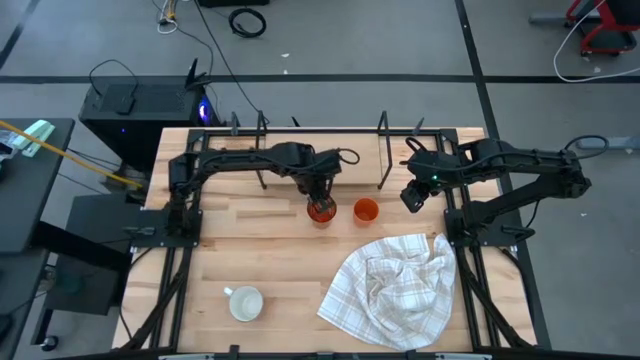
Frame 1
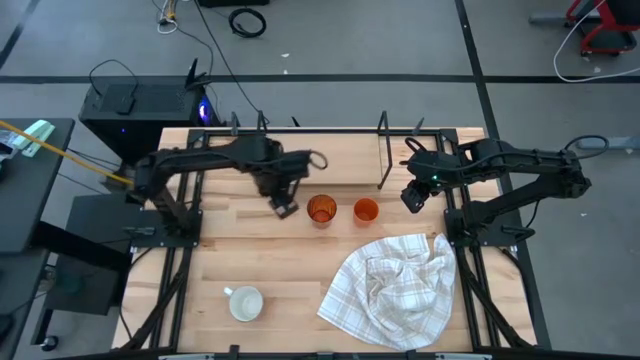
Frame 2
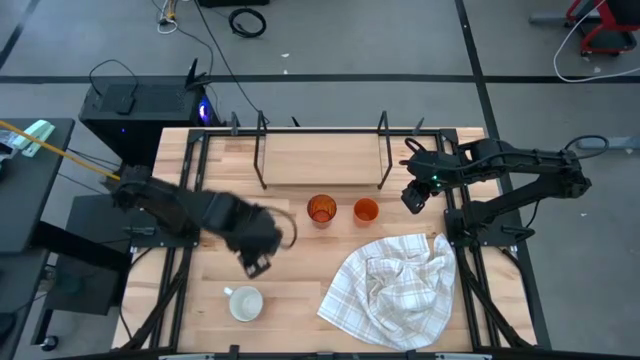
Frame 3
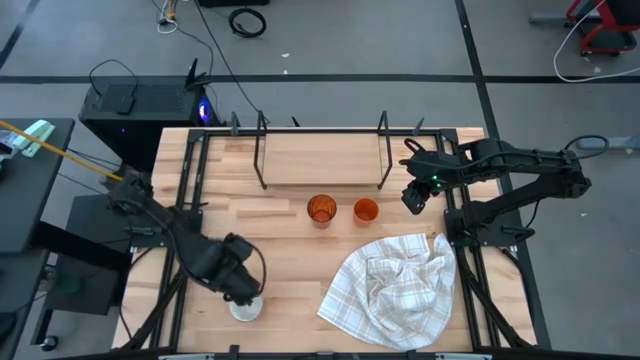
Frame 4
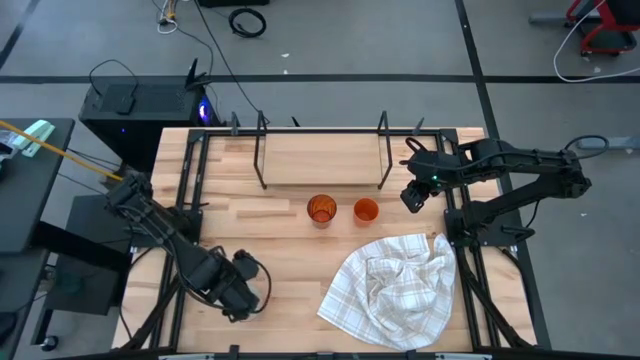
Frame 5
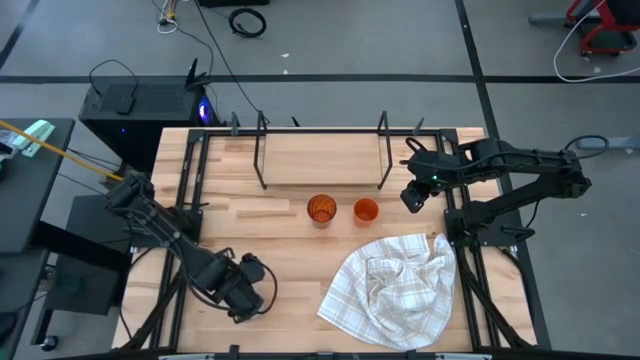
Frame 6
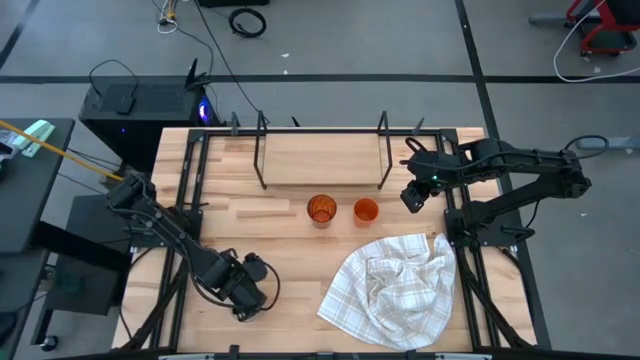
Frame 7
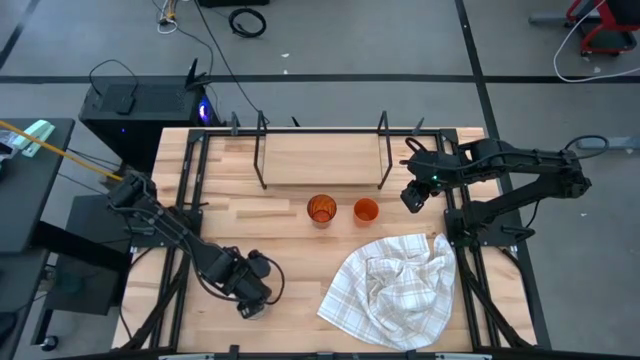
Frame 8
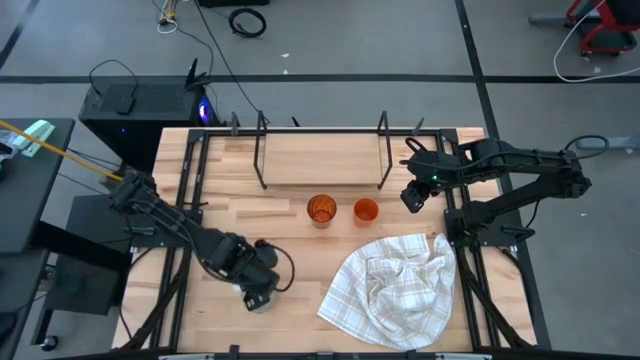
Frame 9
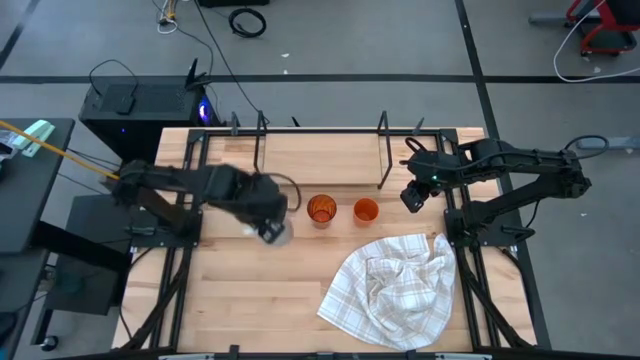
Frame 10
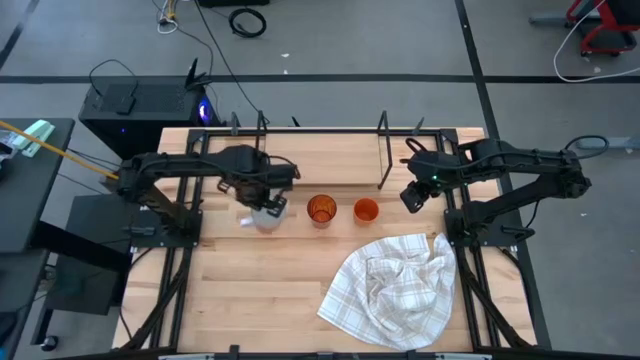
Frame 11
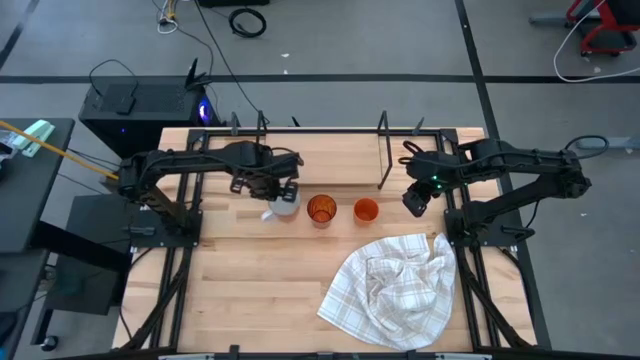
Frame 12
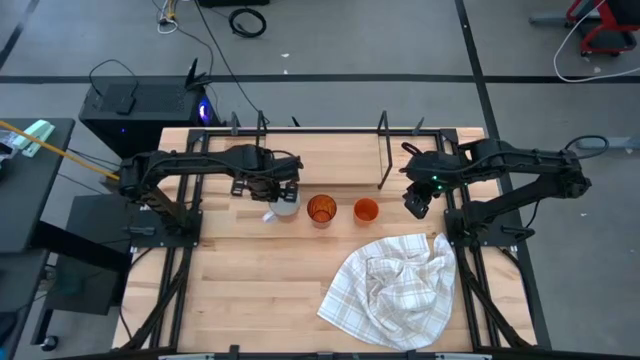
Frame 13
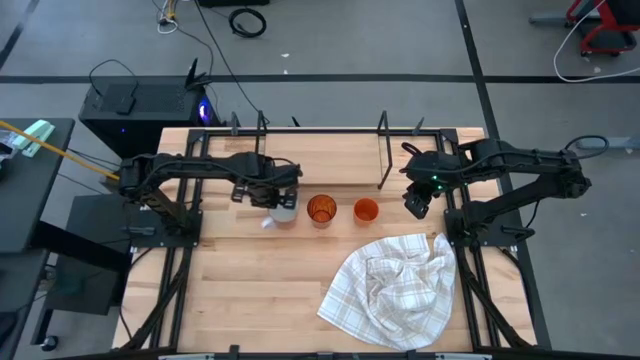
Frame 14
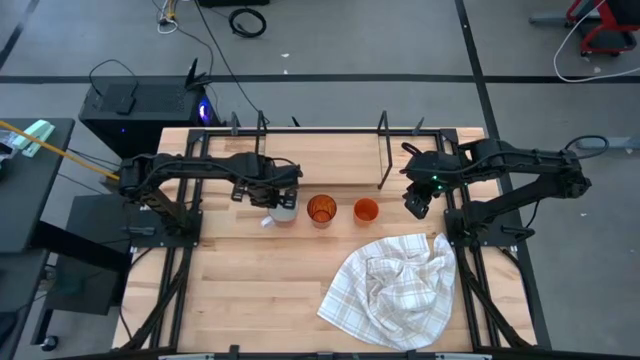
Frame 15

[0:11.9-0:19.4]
Task: Stack small to large cups/mugs on shelf
Move the orange mug to the left of the orange cup

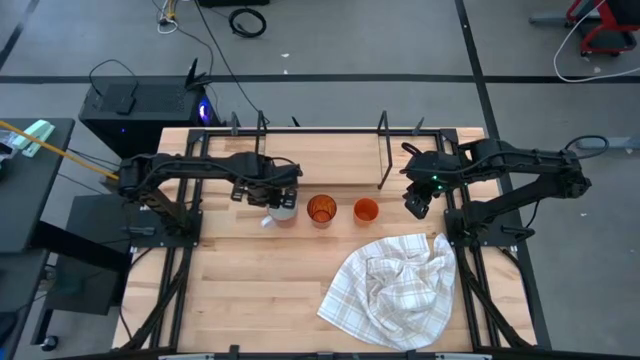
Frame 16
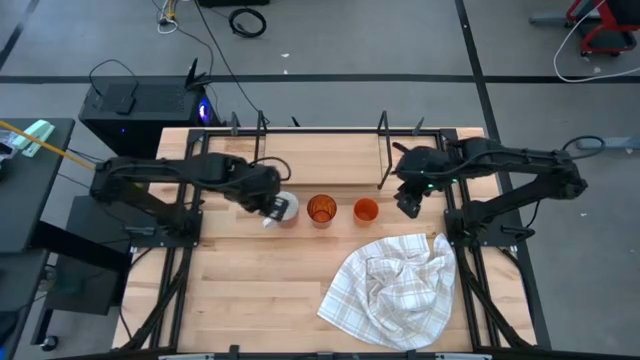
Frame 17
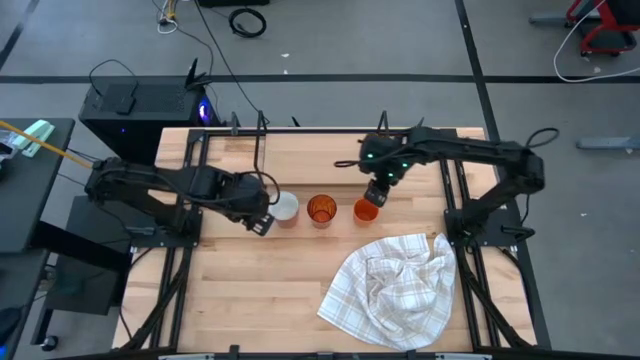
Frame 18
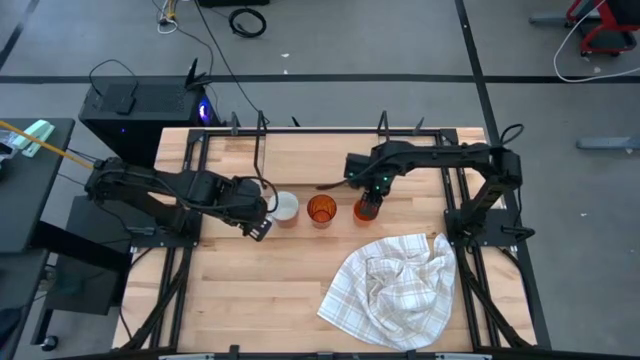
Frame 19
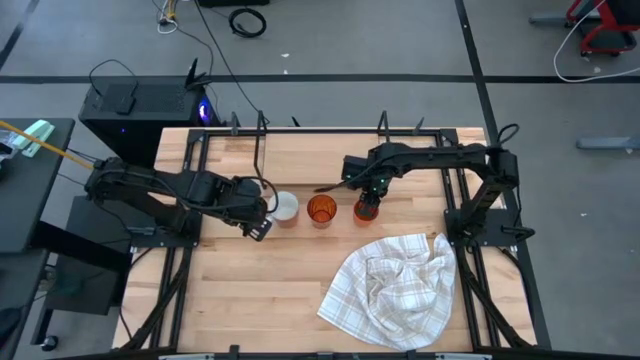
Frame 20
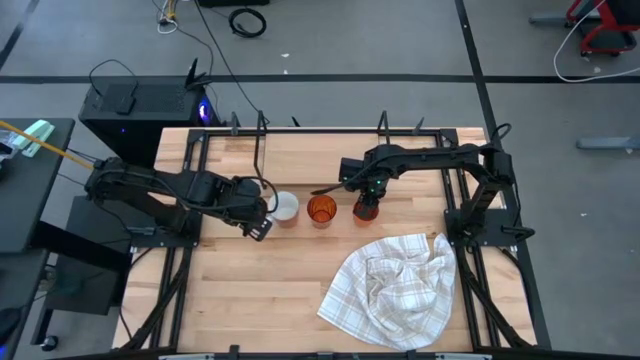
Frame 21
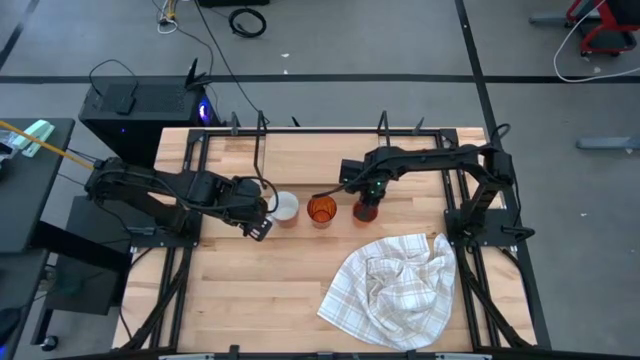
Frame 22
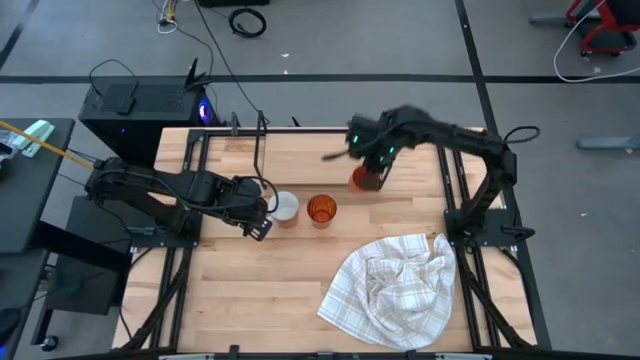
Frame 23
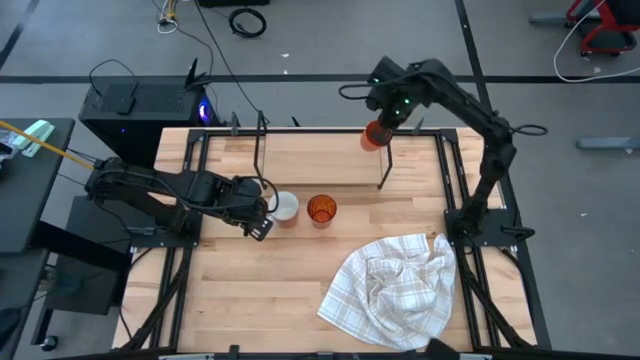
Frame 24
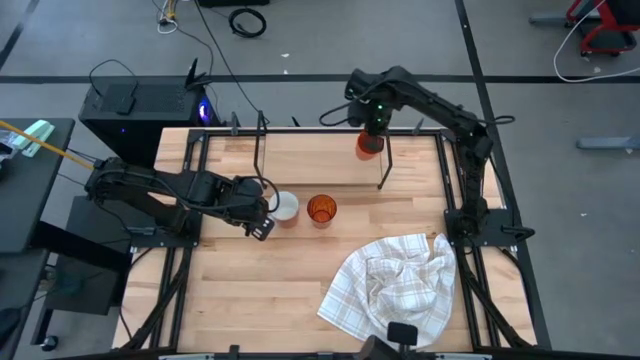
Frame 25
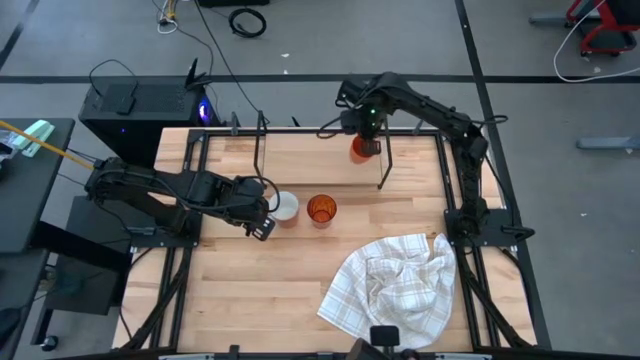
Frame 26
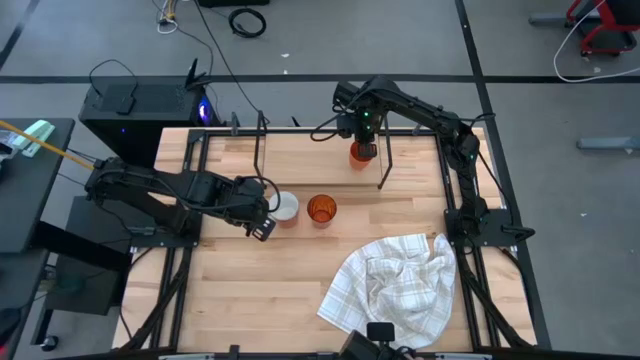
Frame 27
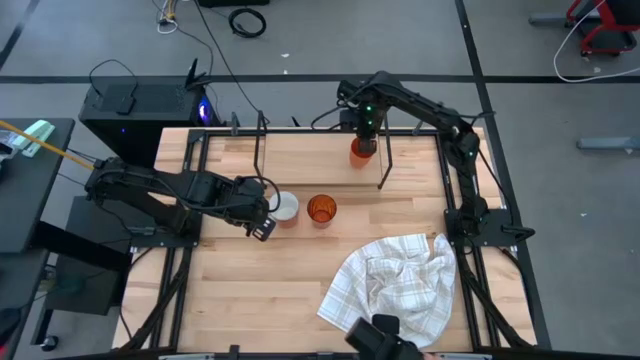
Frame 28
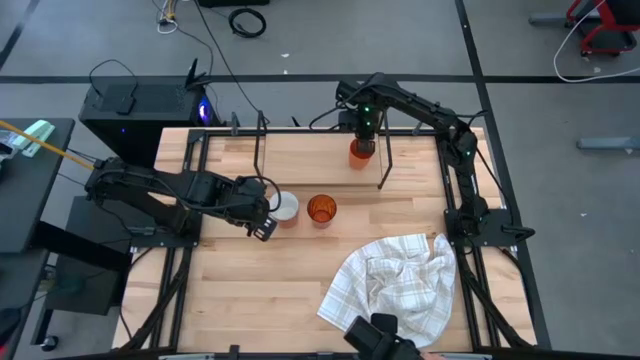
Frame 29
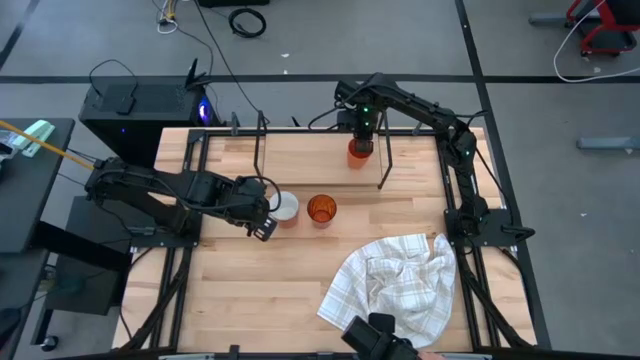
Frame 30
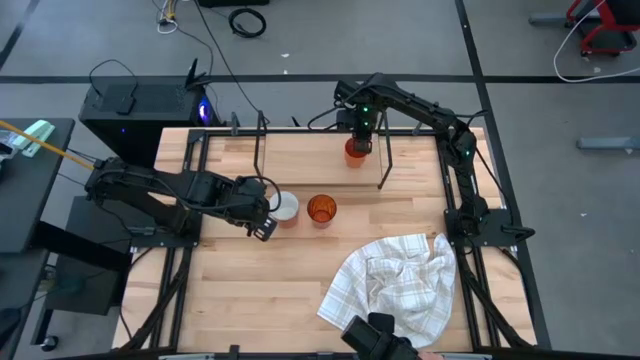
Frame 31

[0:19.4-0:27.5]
Put the dark orange cup on the shelf

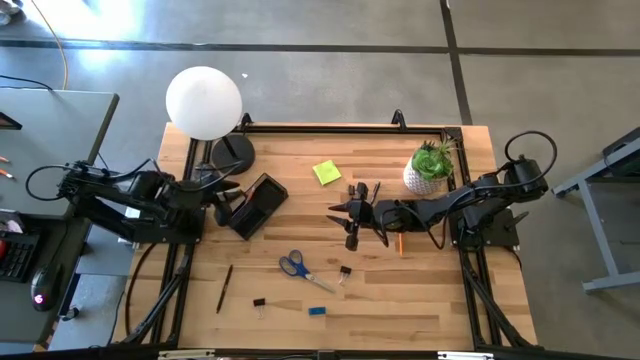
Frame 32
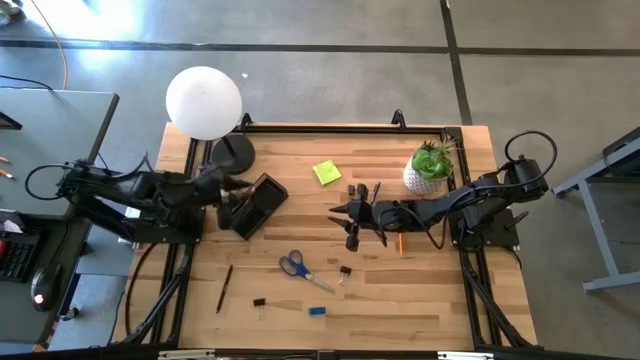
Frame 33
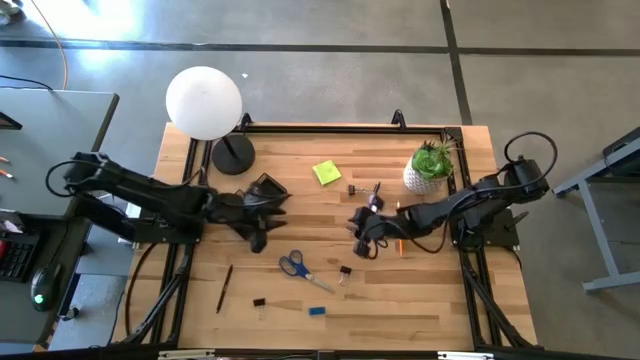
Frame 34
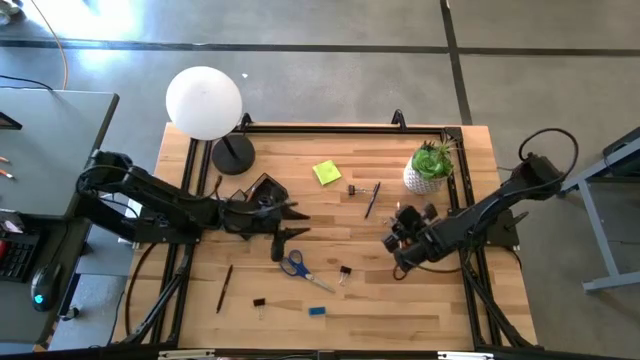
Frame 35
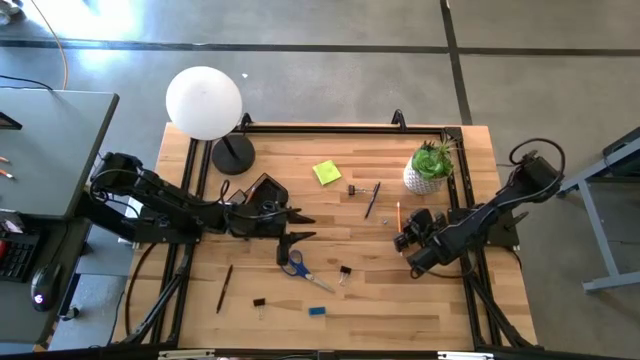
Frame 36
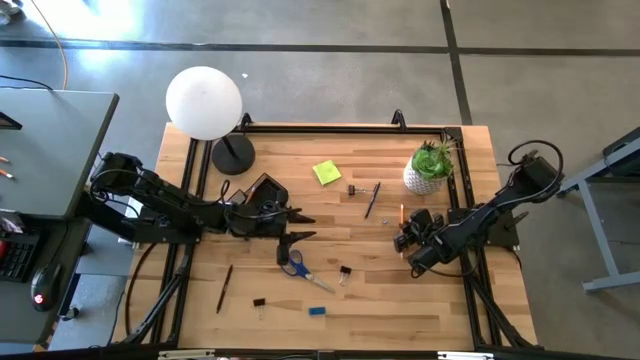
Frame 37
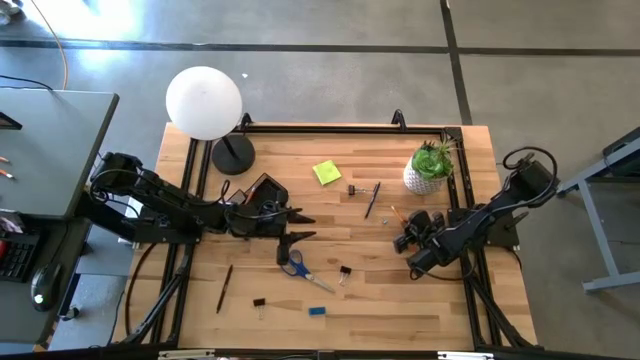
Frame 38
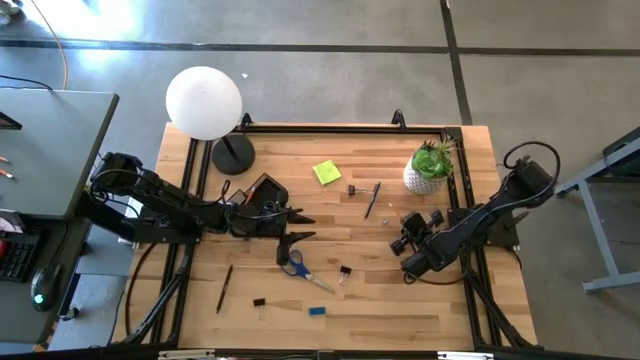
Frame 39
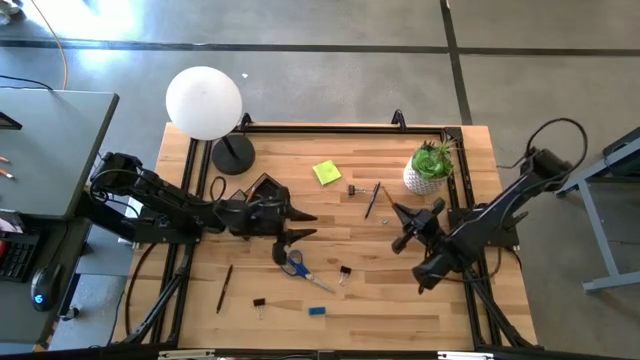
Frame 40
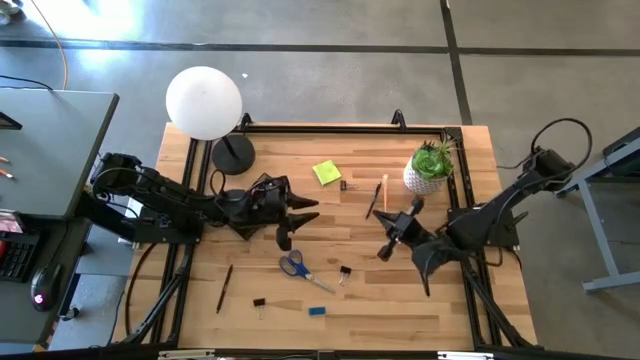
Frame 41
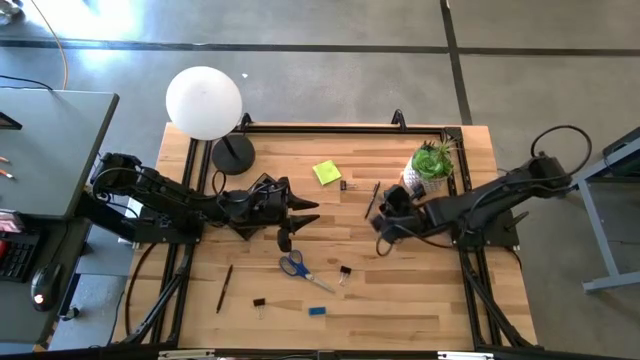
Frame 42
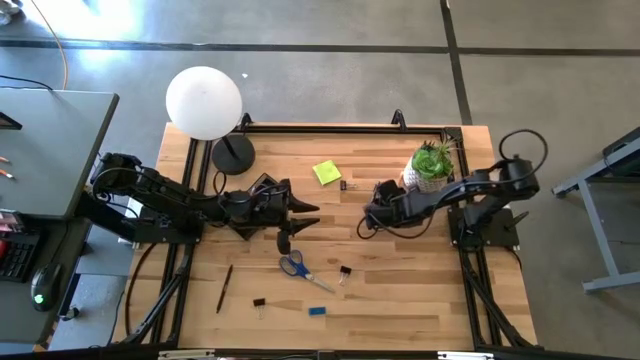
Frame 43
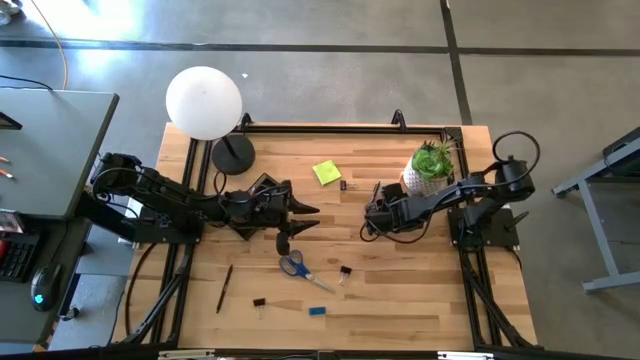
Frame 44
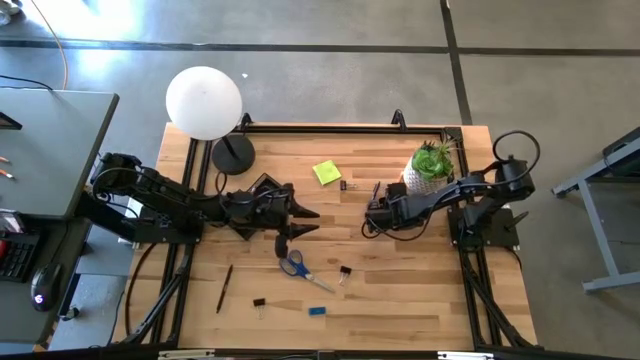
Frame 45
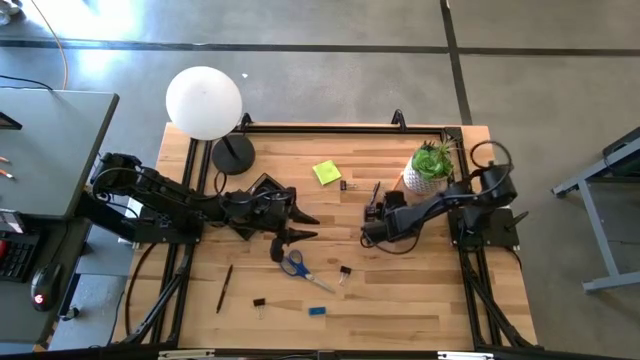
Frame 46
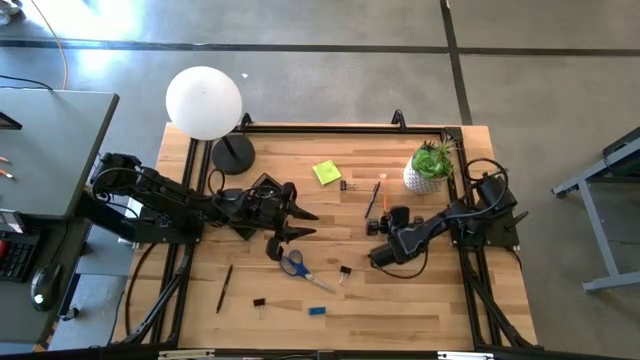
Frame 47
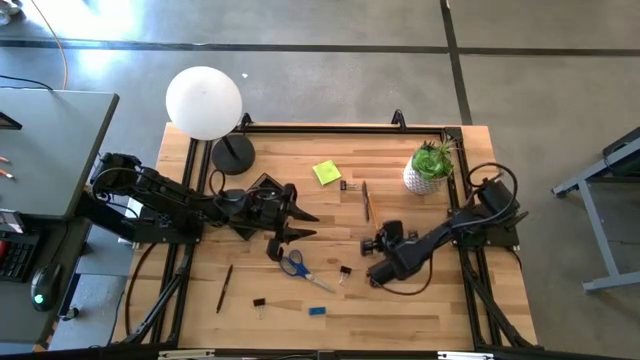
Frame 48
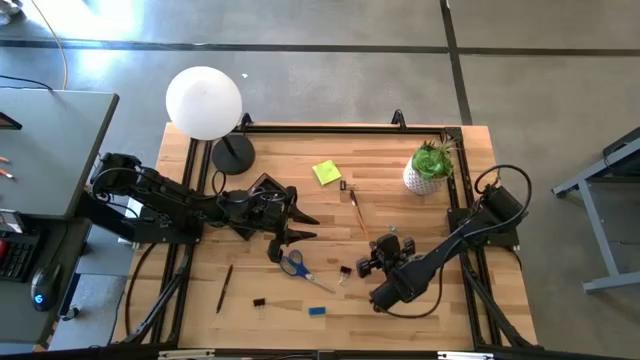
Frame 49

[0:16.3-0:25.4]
Task: Pick and place office supplies into organizer
Put the orange pencil into the black mesh desk organizer
